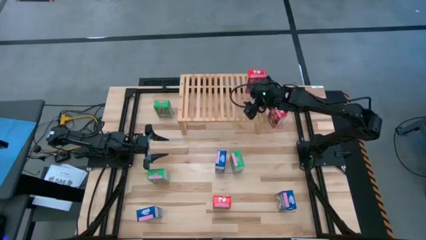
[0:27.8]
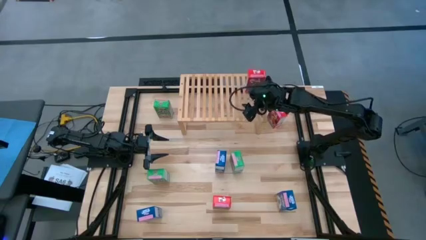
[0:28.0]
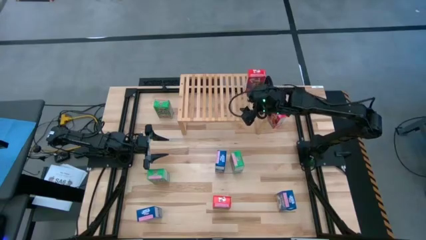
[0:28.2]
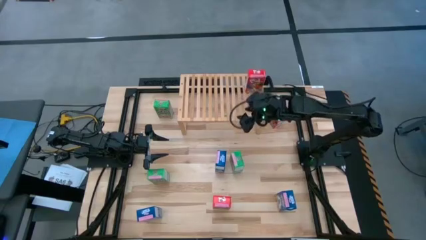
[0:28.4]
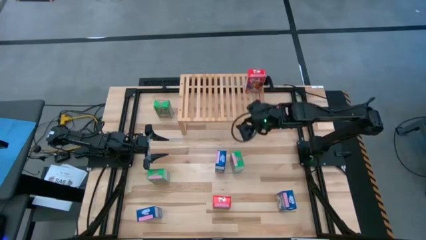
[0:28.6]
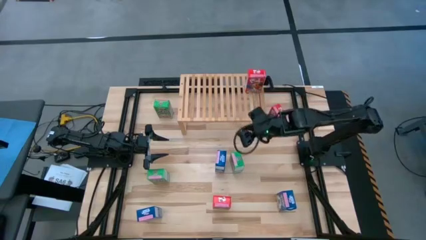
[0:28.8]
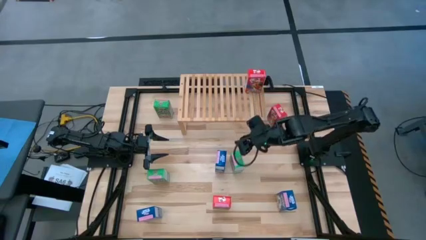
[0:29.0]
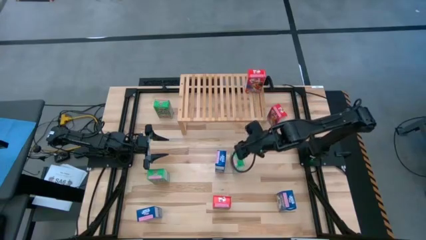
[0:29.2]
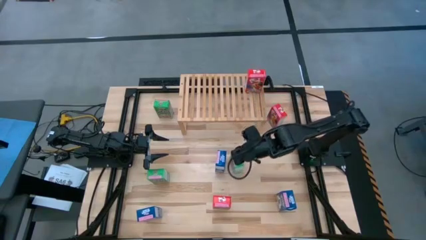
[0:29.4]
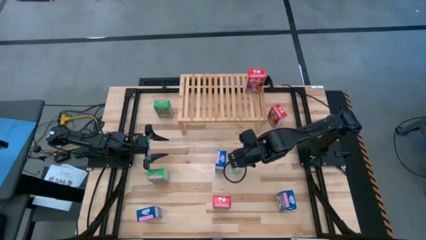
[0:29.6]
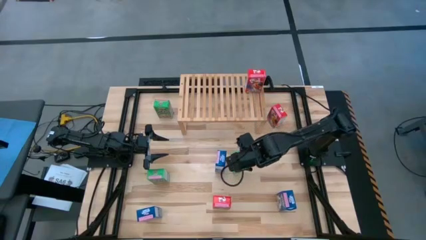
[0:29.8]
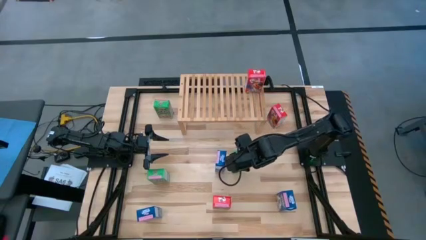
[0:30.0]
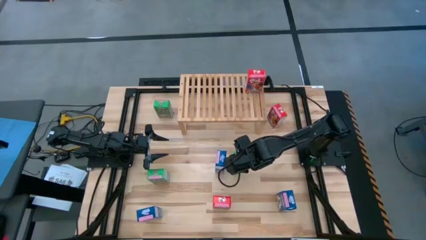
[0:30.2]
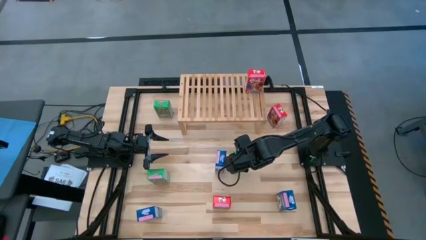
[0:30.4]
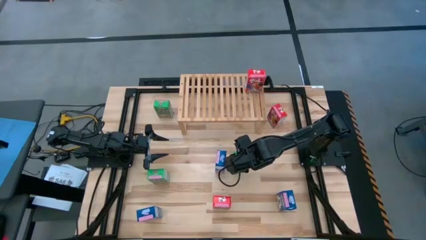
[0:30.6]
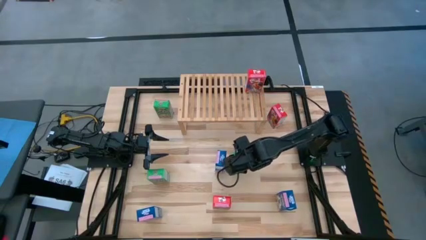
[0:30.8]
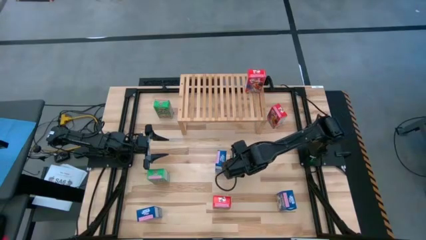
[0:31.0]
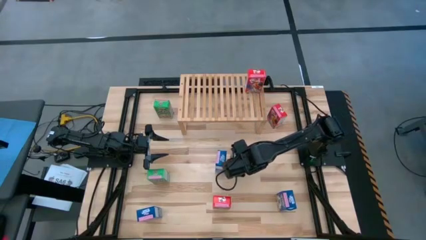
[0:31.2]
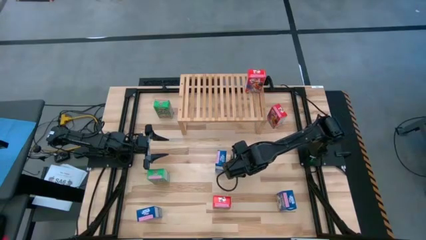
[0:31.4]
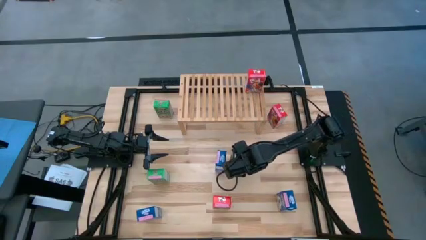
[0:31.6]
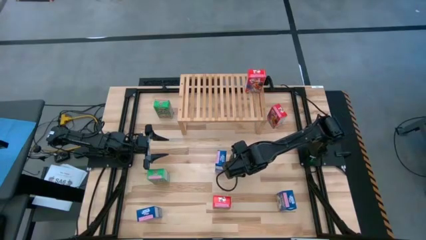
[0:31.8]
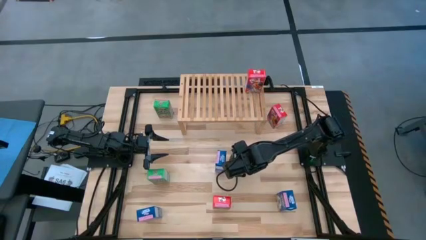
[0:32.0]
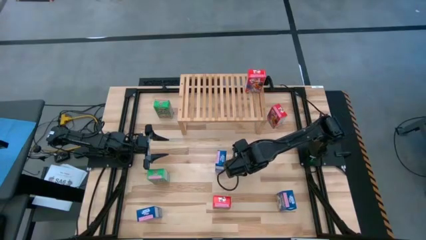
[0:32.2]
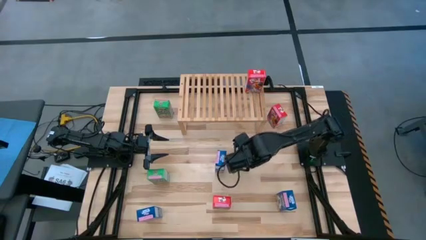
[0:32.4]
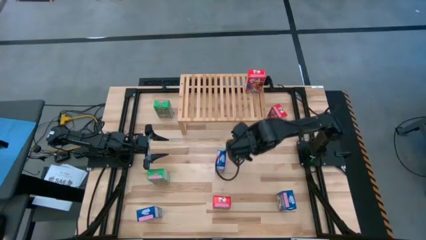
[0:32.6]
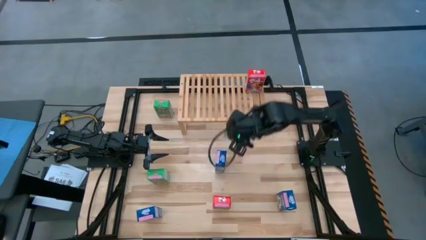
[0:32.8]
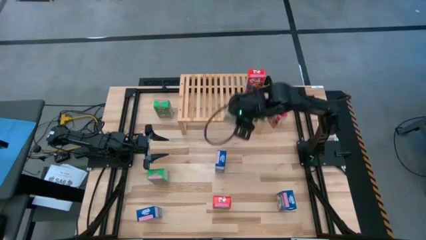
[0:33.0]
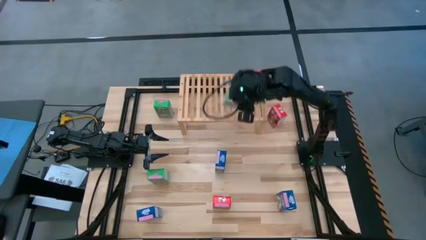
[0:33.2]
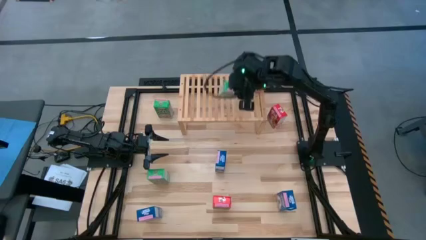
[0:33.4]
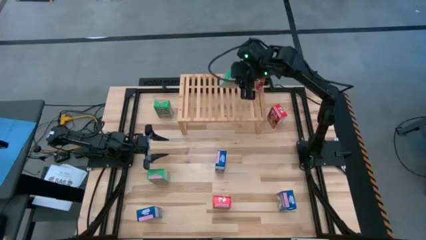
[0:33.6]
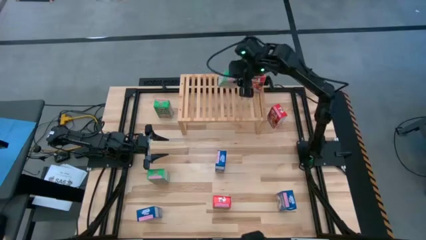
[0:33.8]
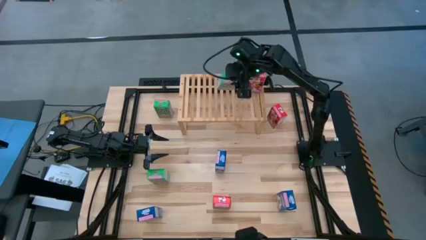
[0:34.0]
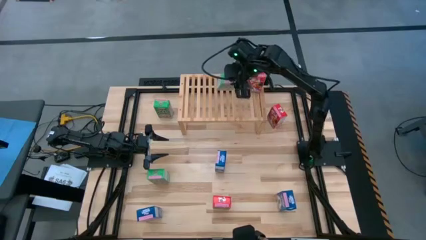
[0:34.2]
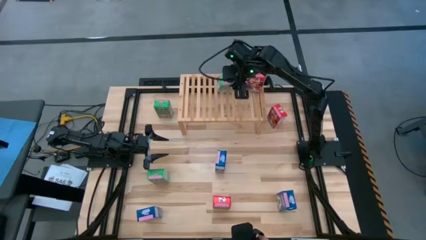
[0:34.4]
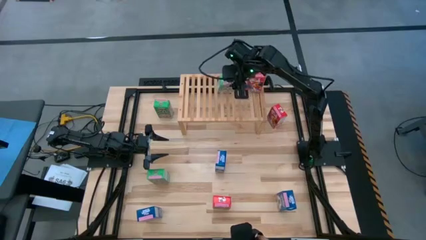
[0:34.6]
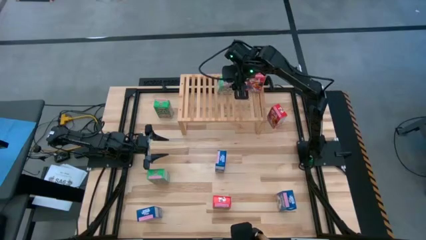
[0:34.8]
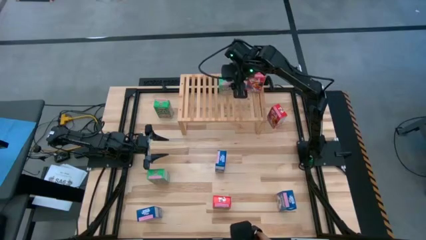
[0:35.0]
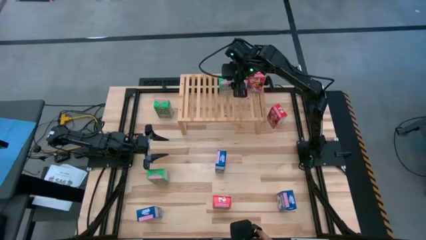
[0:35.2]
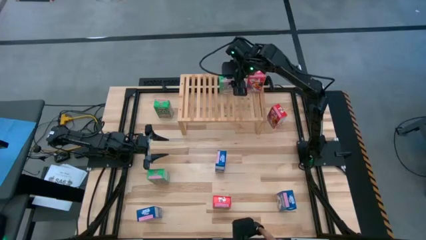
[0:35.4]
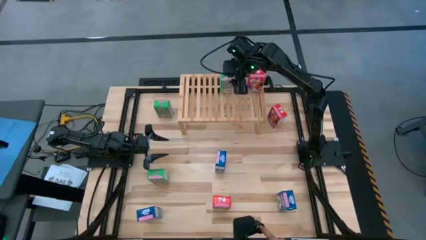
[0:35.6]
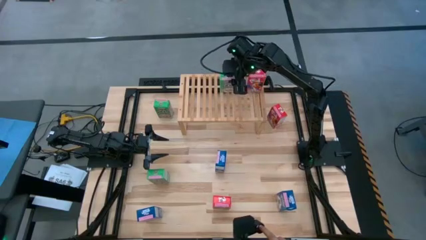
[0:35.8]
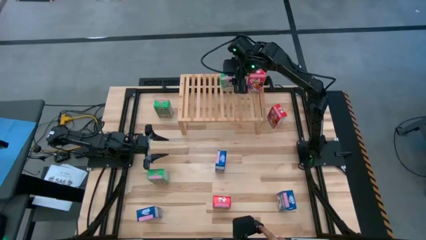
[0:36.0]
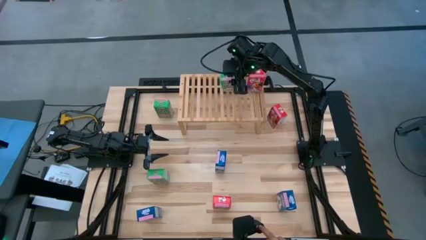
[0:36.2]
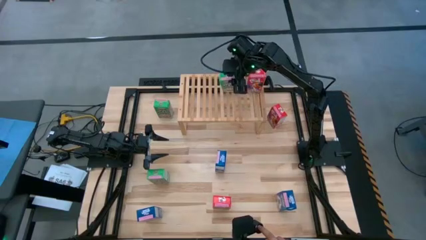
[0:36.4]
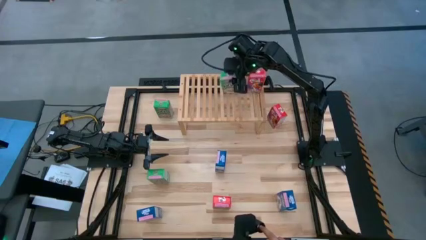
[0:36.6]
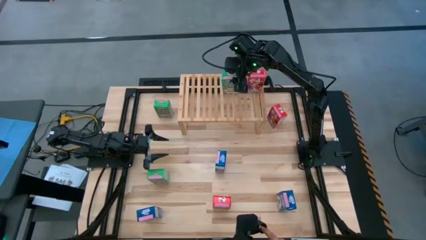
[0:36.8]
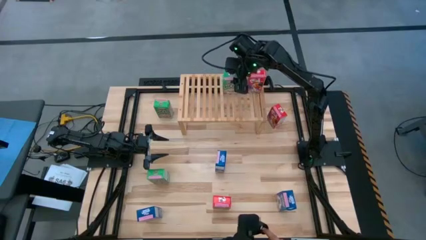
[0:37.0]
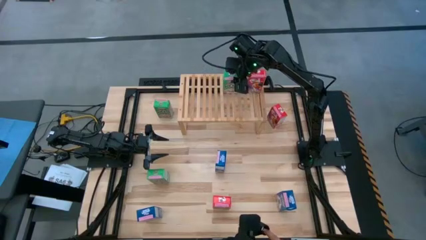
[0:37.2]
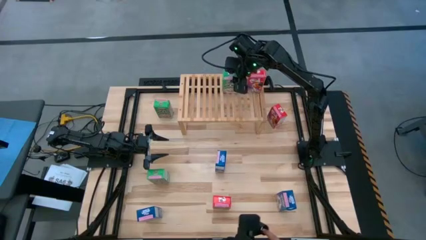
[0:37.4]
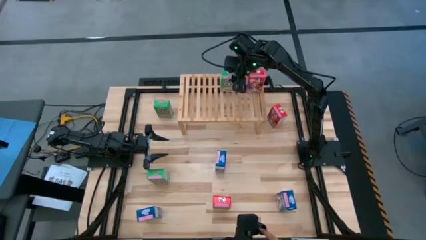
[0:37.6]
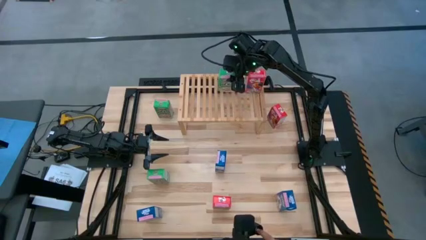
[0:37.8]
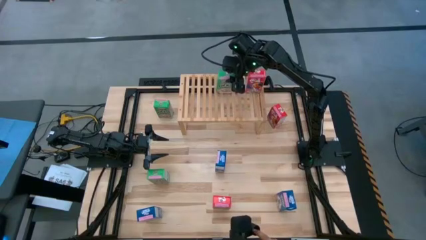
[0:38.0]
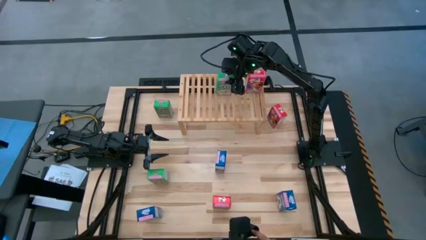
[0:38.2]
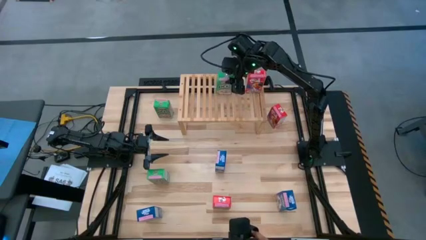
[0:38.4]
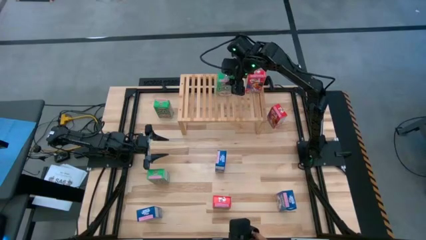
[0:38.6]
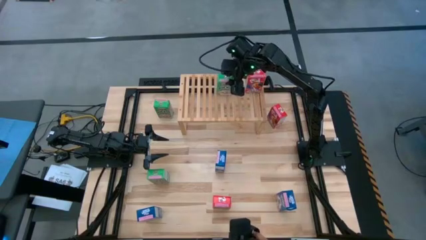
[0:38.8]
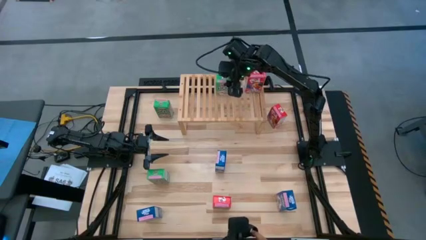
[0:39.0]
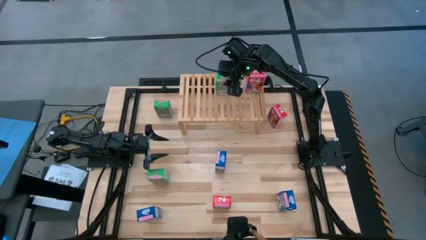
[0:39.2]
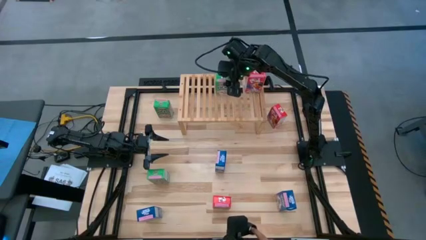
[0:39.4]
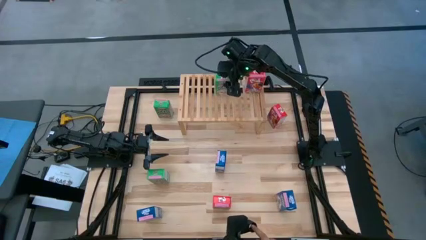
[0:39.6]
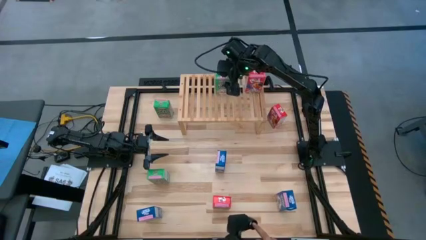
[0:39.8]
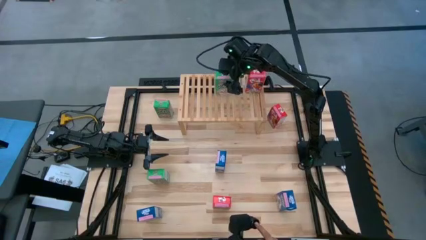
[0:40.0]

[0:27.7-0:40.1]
Task: Stack cereal on shelf
Put the bottom right green cereal box on the shelf

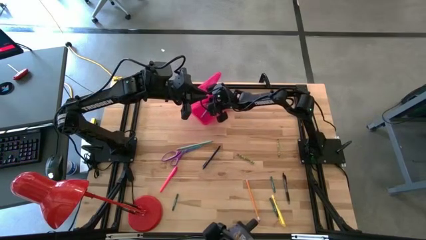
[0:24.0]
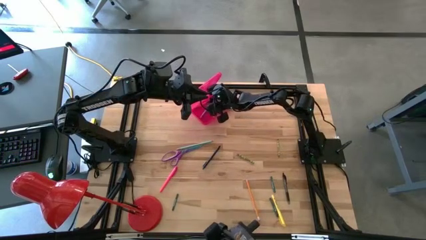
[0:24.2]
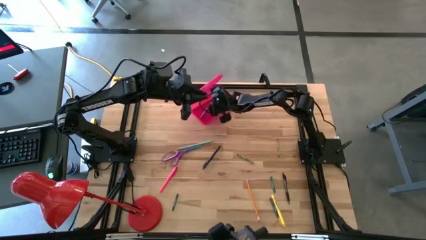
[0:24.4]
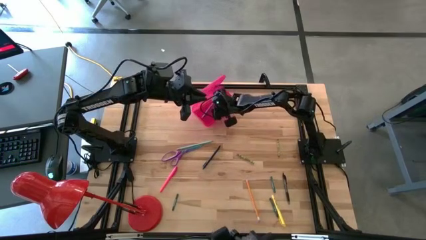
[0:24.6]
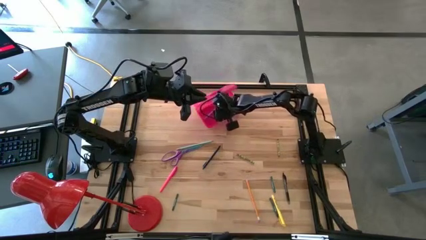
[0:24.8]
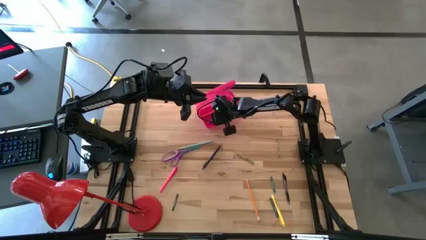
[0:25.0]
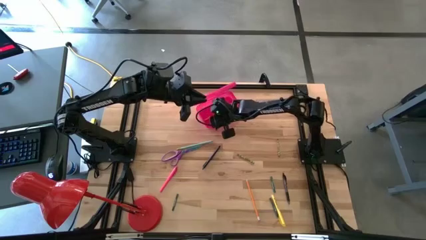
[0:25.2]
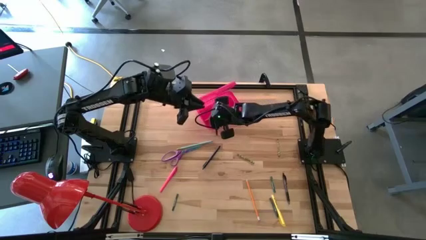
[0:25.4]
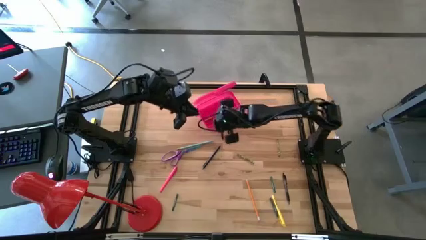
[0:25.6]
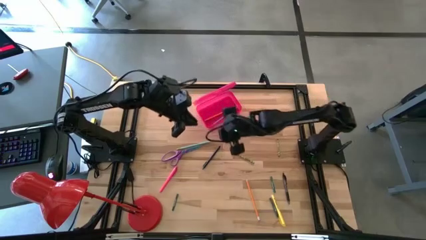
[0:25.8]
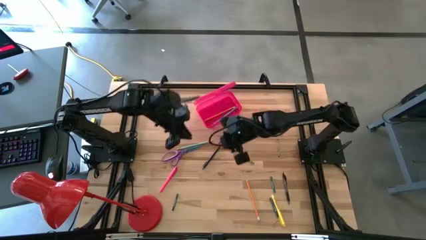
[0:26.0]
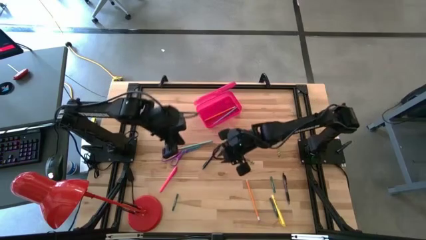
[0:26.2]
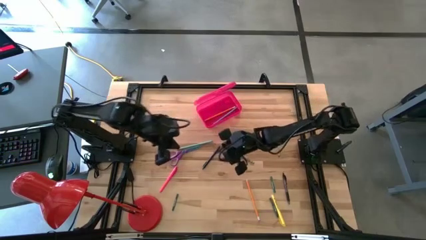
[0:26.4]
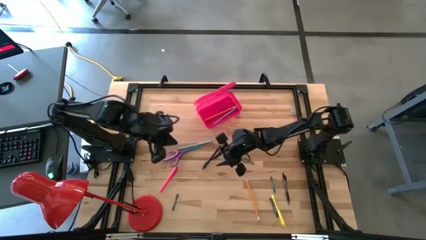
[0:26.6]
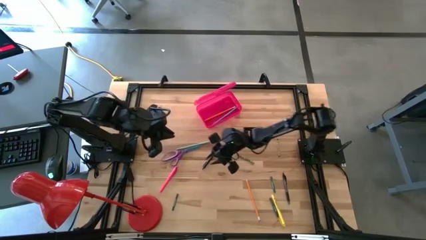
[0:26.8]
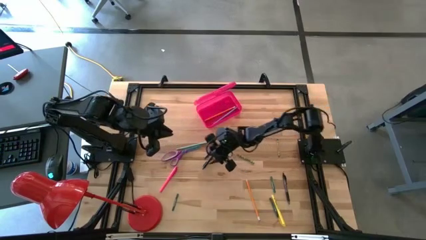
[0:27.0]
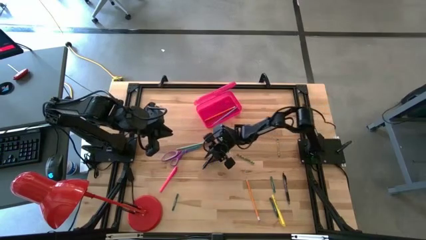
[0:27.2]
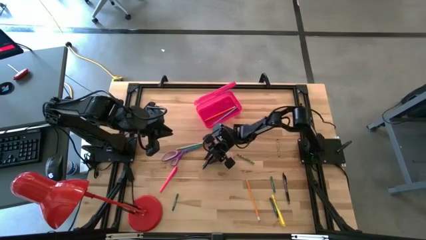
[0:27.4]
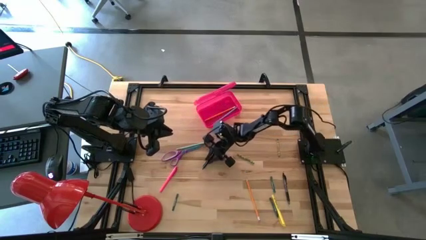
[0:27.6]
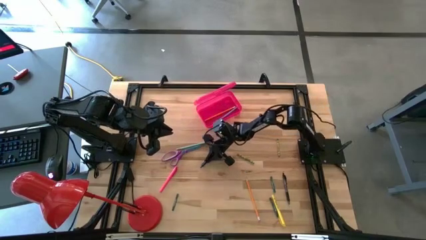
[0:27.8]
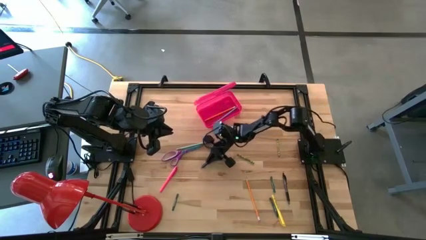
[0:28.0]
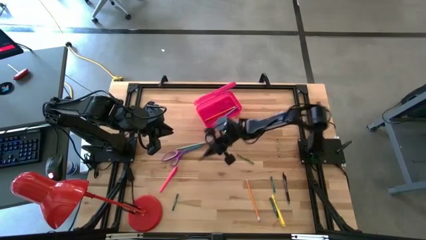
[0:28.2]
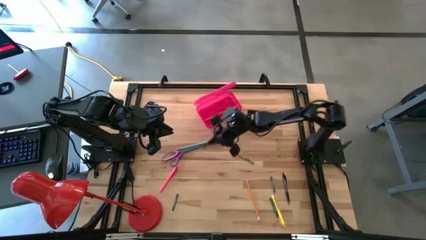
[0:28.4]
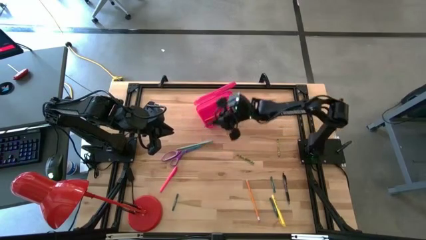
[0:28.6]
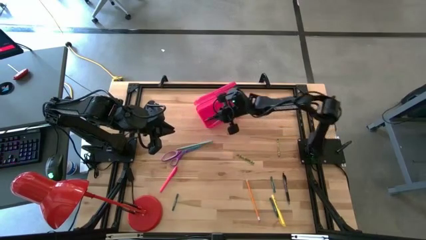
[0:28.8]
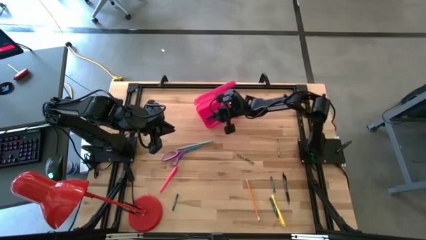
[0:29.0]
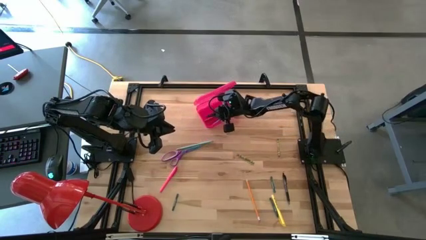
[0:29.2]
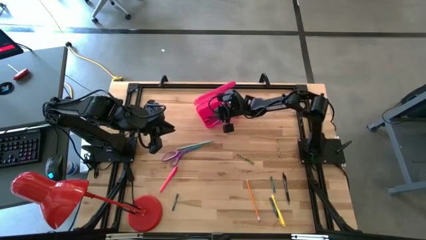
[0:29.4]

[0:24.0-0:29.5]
Task: Pick & place school supplies into a supply box
Put the black pen into the pink supply box
